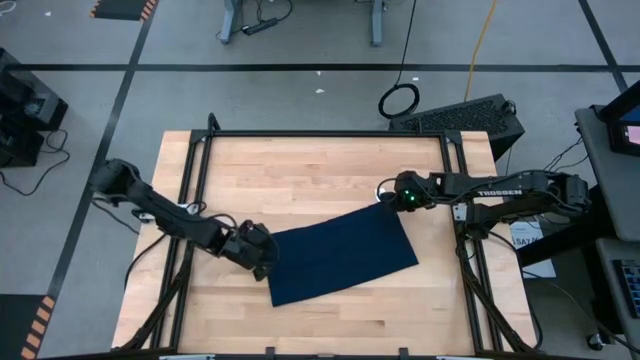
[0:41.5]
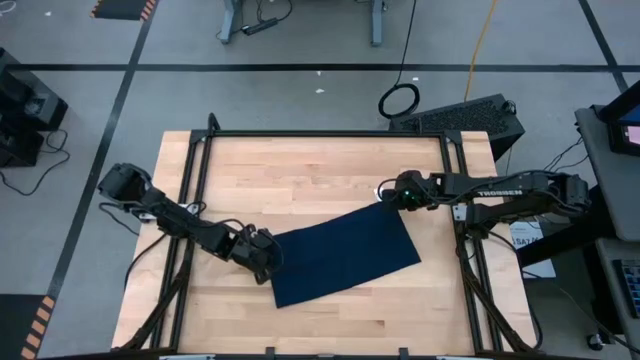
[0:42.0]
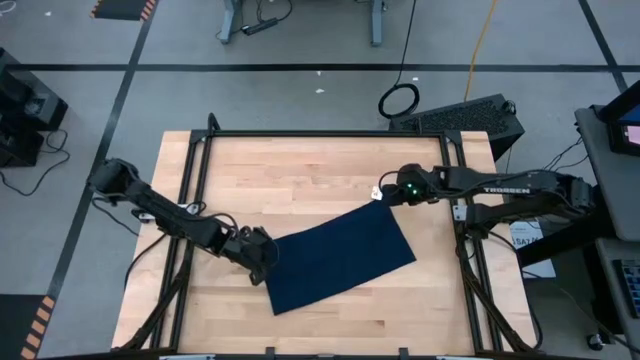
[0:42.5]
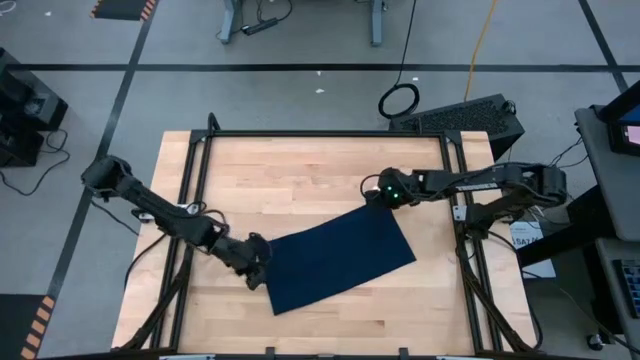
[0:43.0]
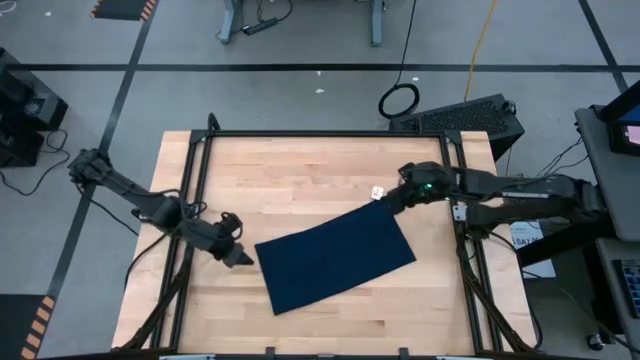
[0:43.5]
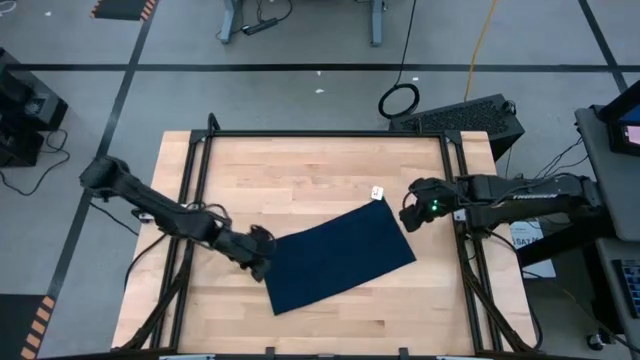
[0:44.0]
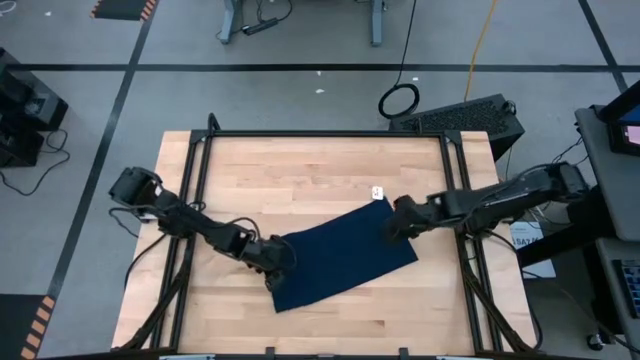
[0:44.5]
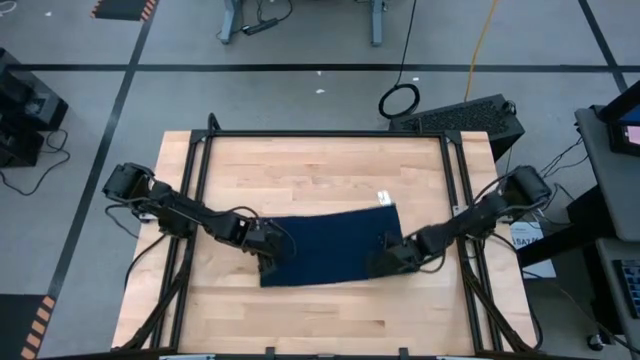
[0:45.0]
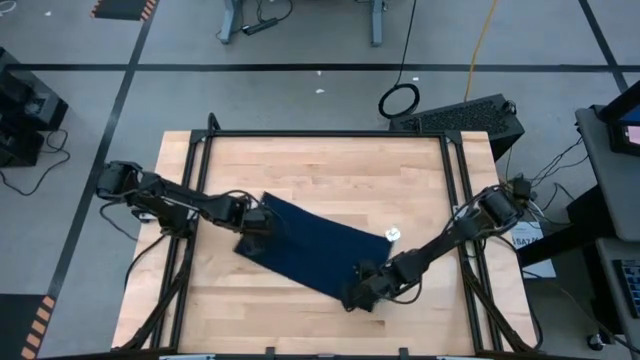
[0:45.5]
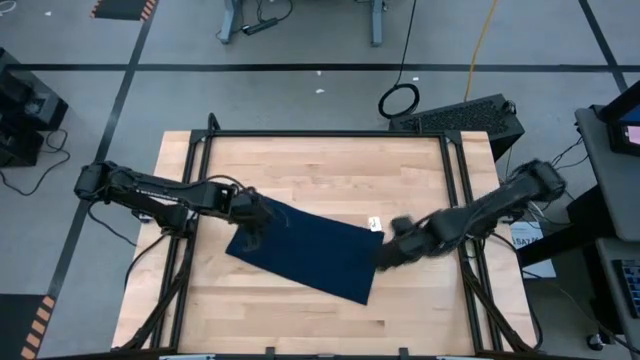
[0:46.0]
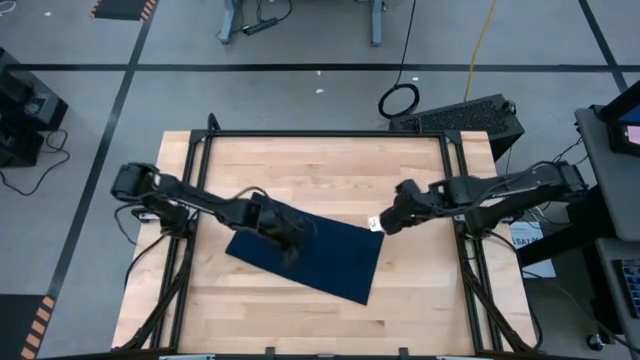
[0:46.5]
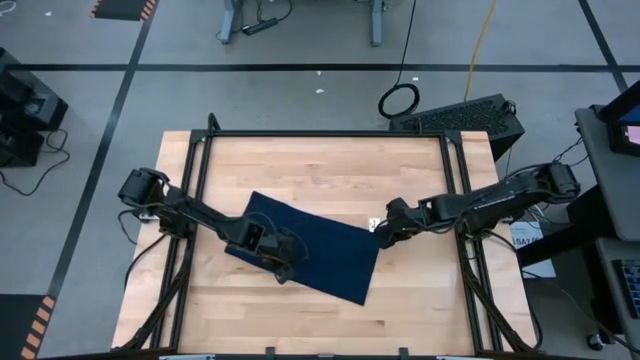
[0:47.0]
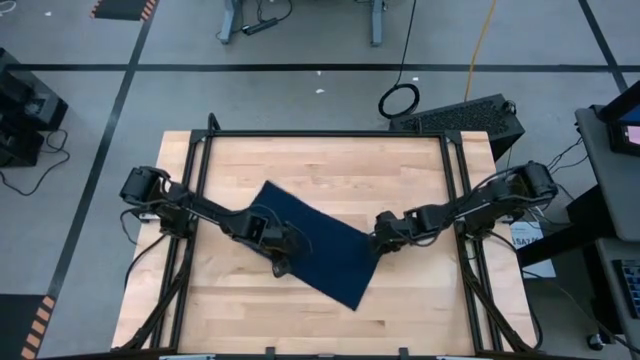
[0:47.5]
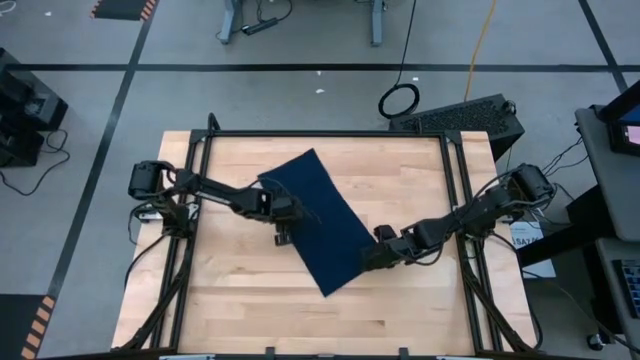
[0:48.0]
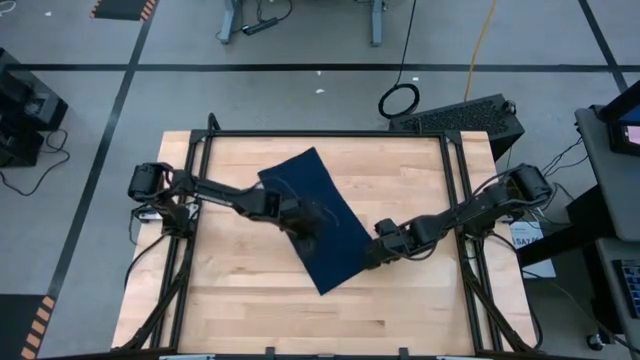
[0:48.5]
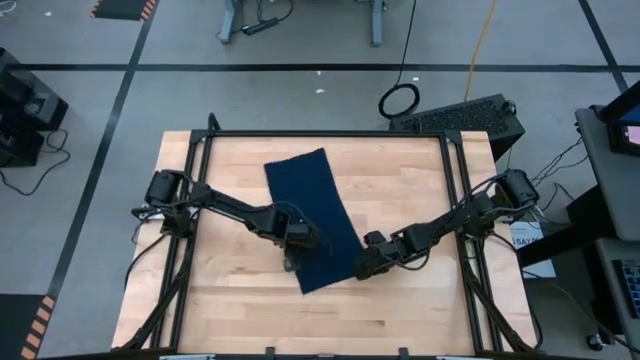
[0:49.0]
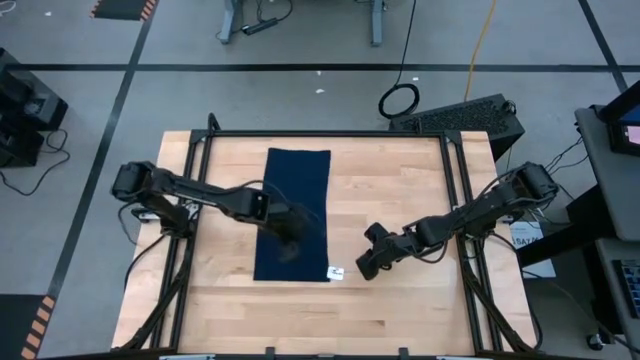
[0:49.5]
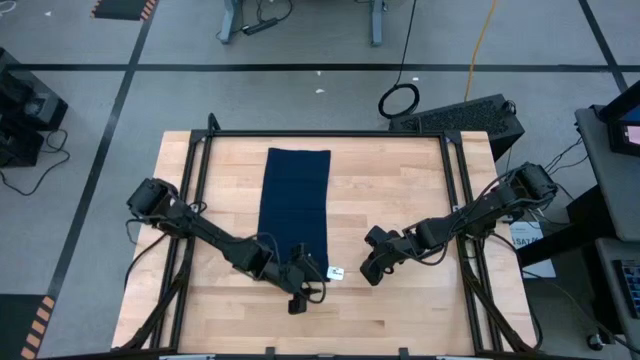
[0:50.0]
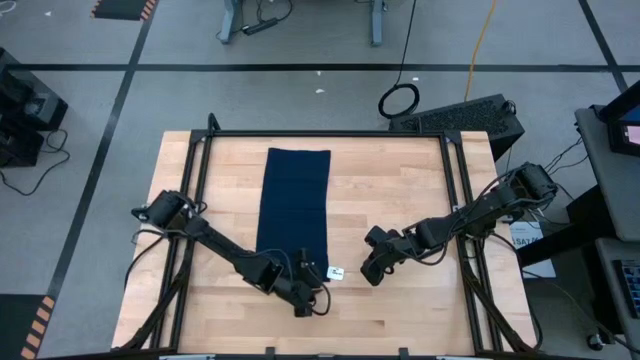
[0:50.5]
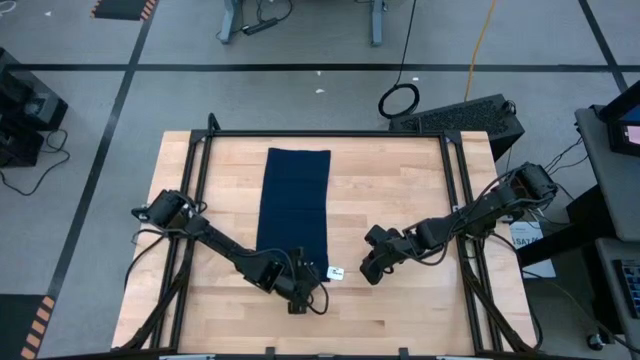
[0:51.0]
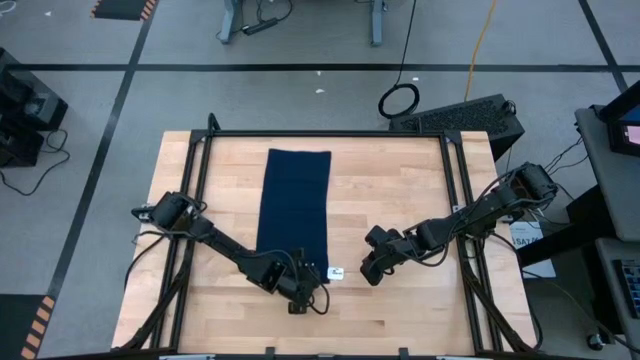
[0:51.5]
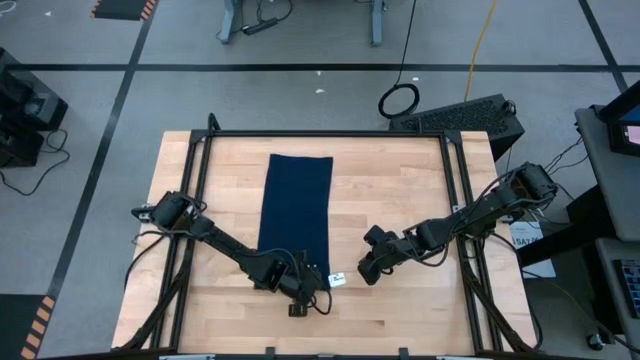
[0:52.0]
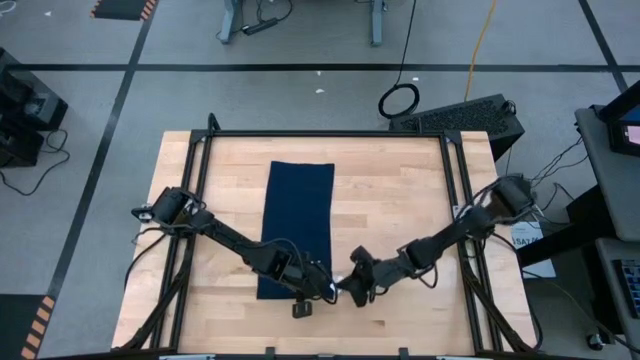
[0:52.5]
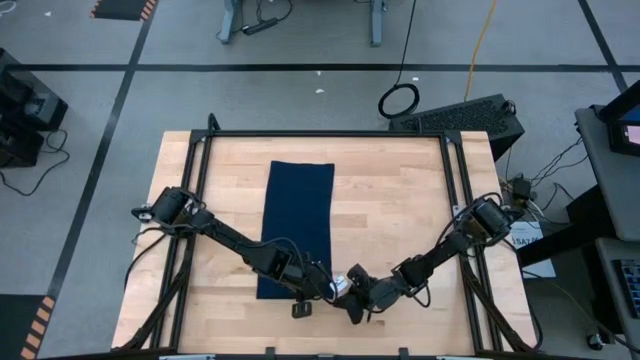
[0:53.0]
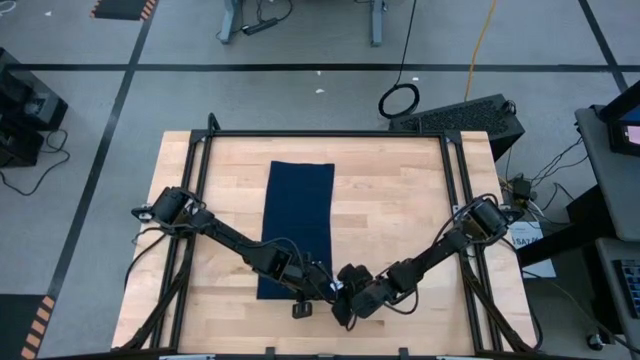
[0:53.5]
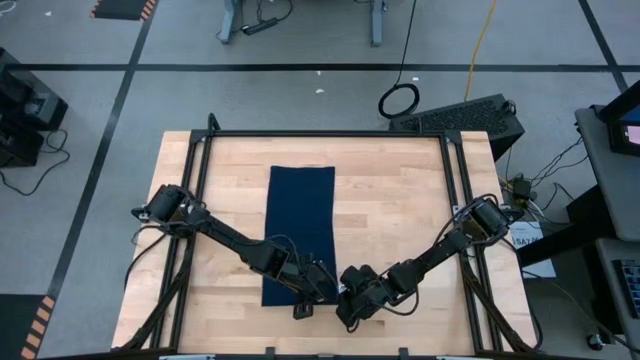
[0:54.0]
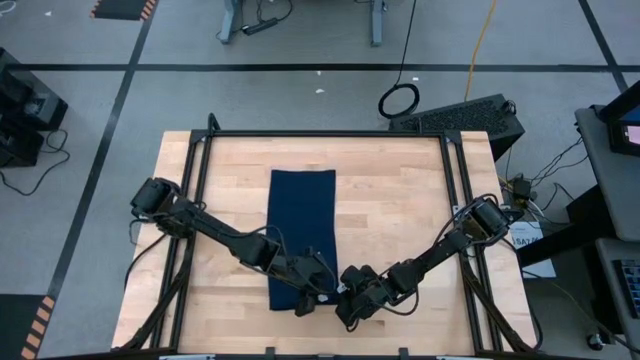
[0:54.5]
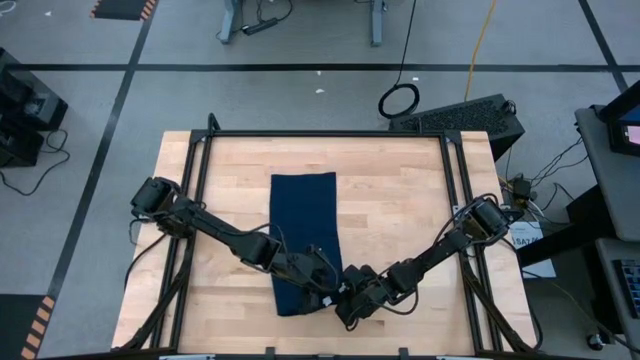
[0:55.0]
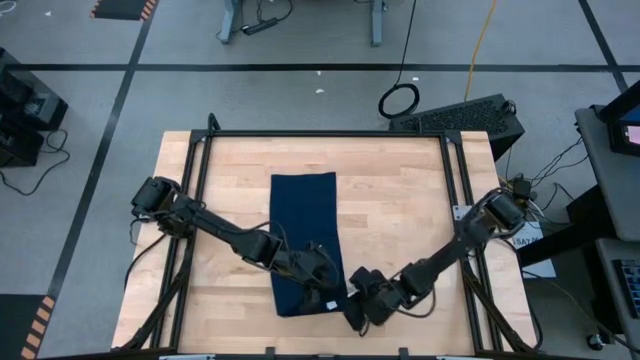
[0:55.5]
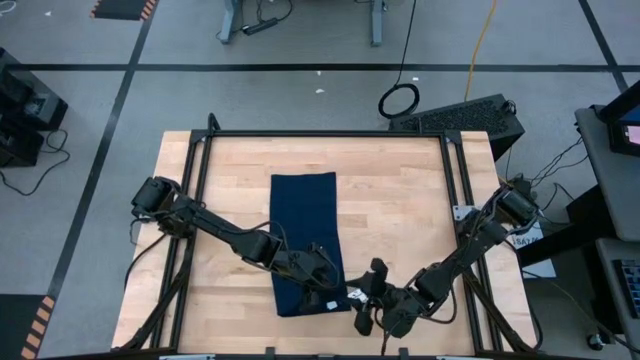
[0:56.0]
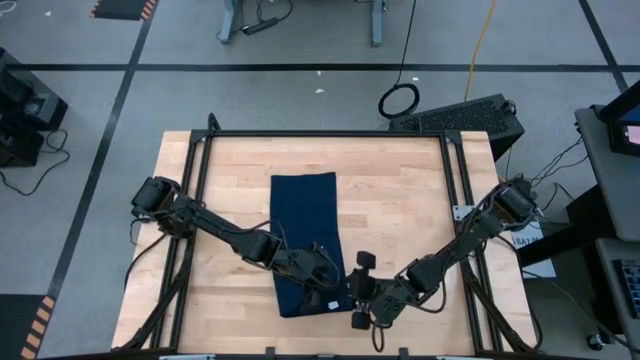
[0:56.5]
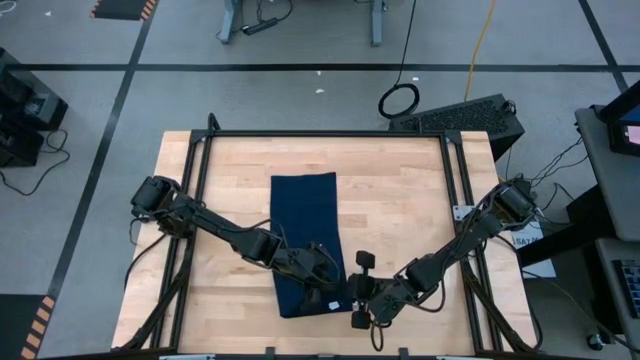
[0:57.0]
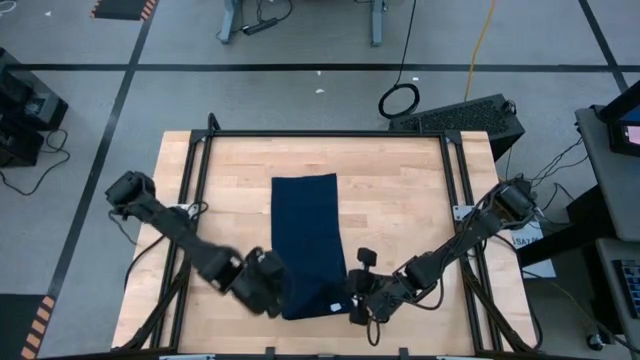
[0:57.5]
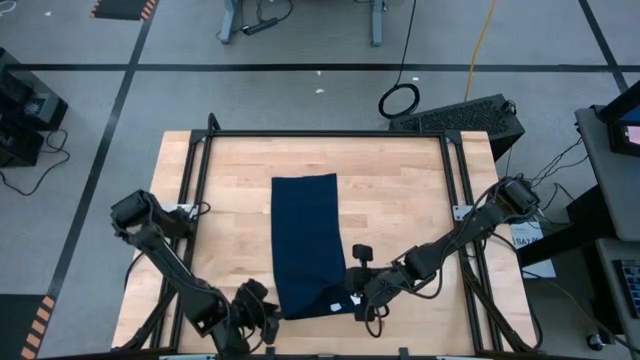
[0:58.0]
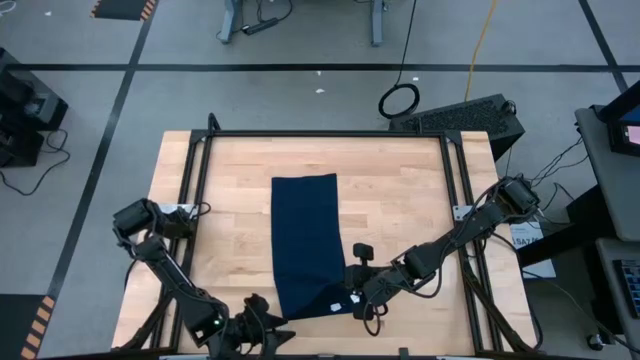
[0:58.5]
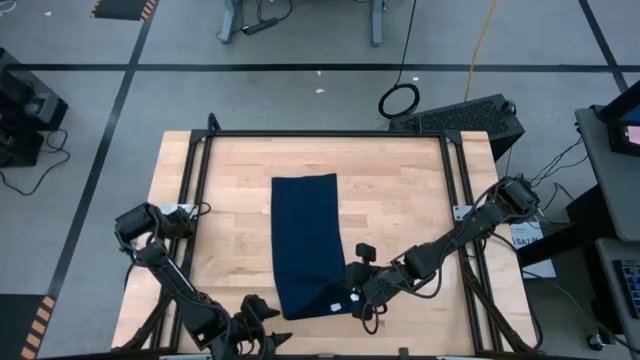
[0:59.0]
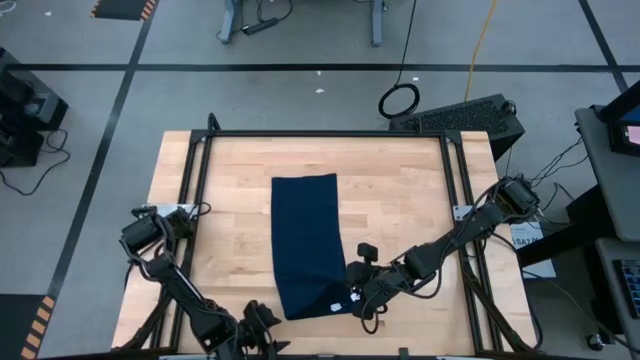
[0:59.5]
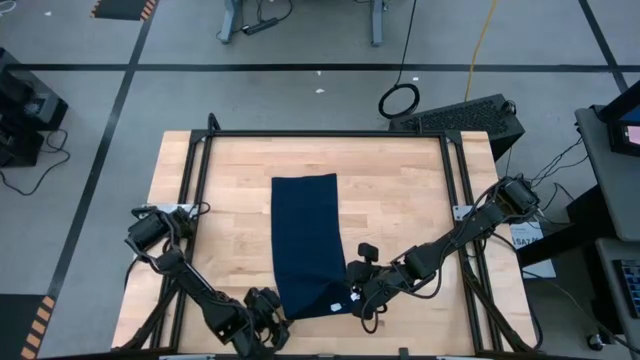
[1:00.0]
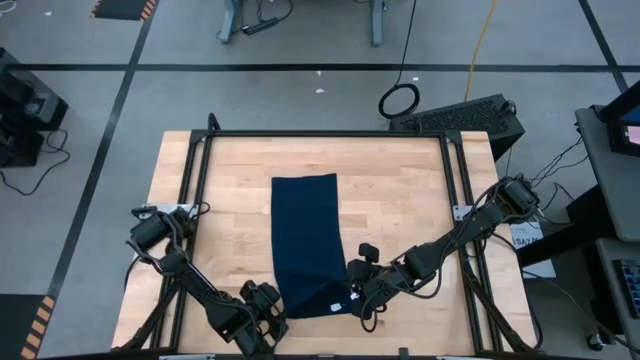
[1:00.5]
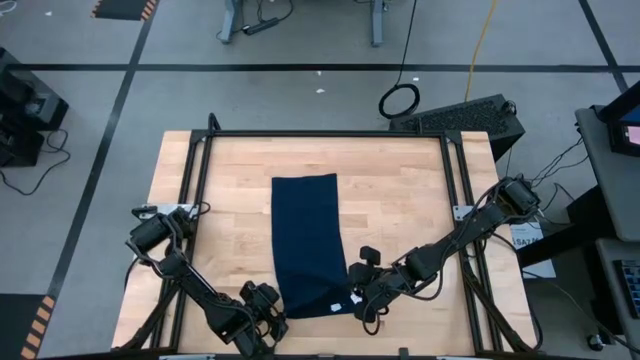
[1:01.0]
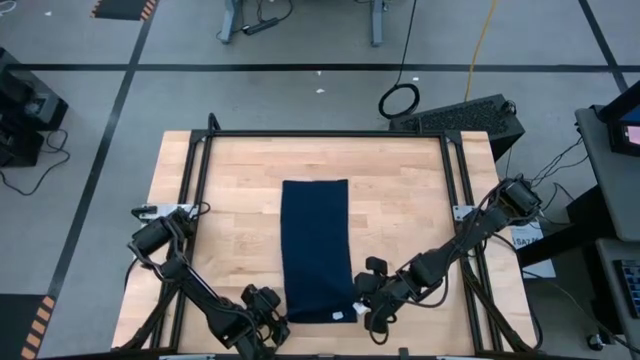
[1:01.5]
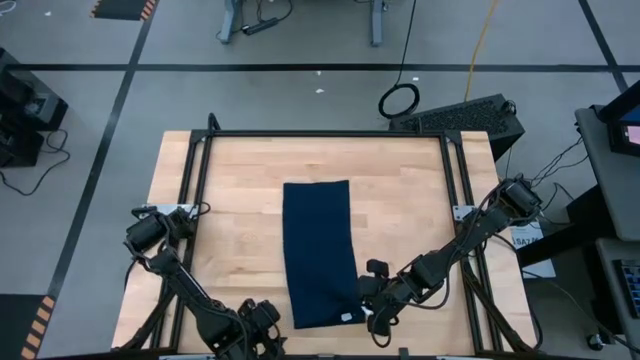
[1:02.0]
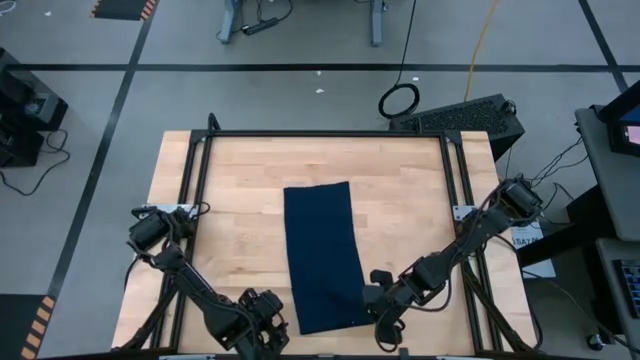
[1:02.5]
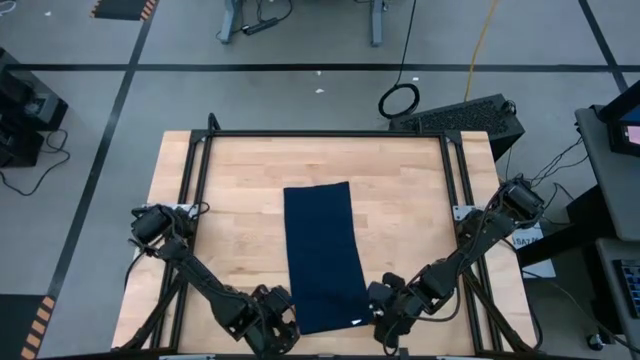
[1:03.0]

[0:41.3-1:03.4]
Task: Roll towel
Roll the dark blue towel

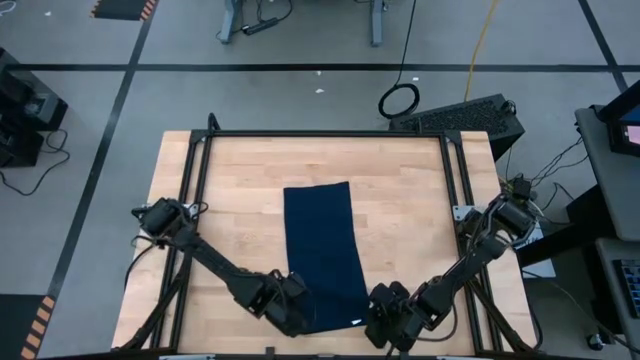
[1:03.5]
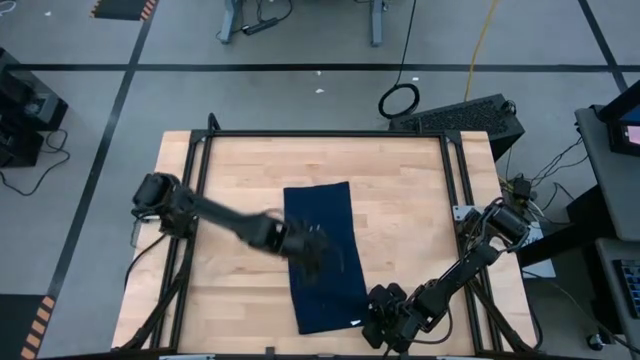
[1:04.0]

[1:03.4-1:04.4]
Roll the dark blue towel
